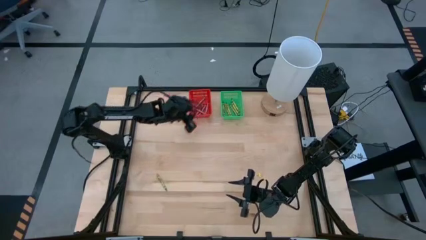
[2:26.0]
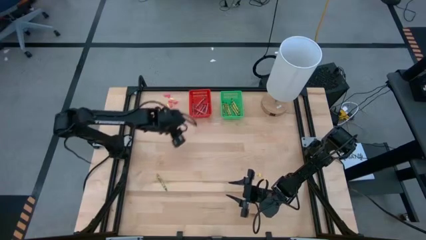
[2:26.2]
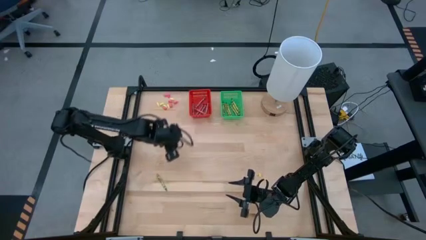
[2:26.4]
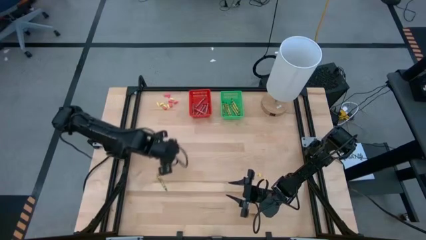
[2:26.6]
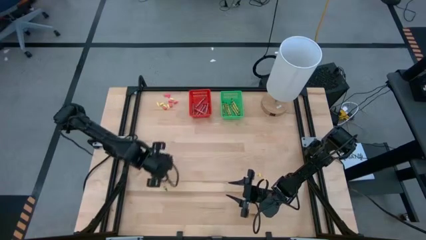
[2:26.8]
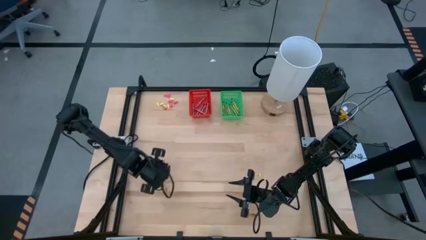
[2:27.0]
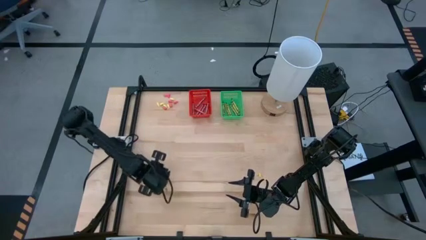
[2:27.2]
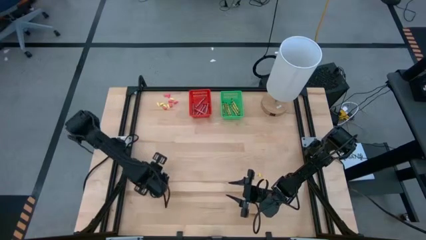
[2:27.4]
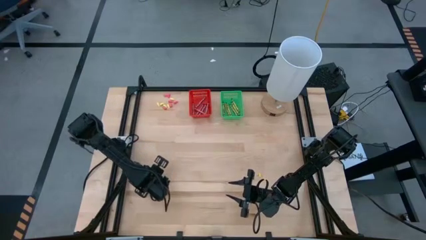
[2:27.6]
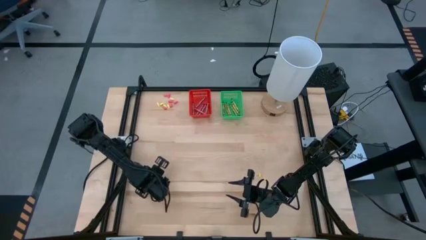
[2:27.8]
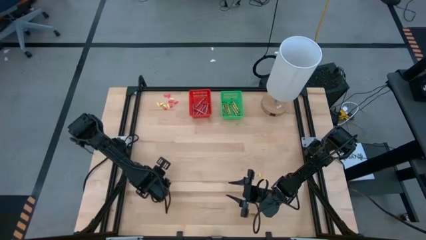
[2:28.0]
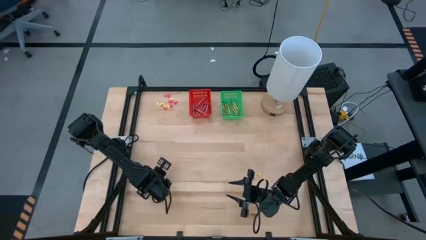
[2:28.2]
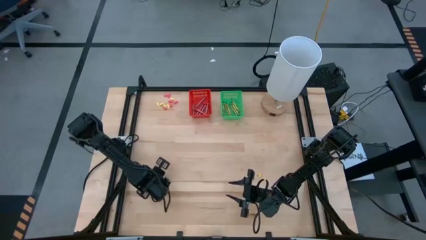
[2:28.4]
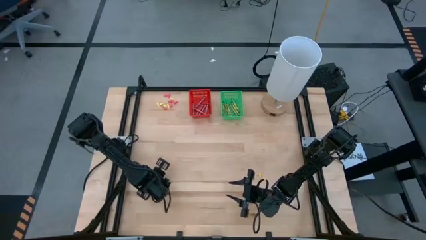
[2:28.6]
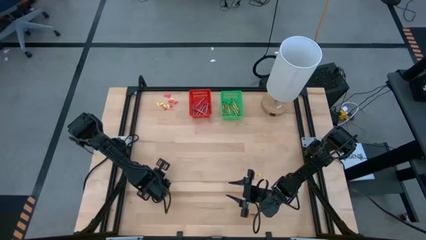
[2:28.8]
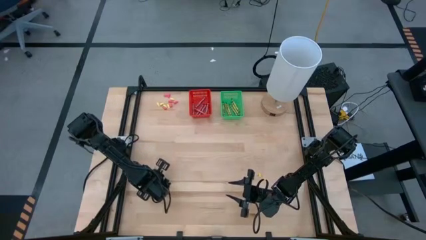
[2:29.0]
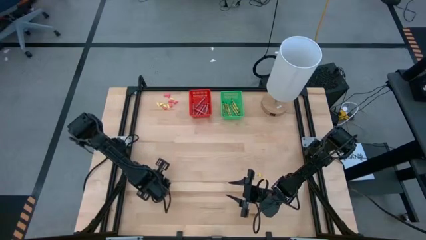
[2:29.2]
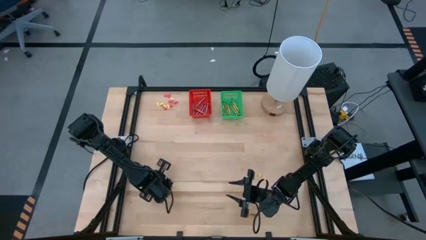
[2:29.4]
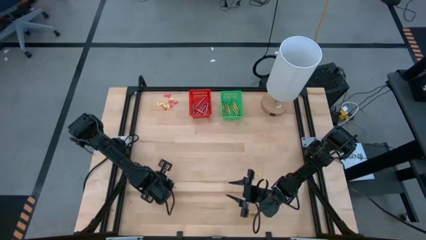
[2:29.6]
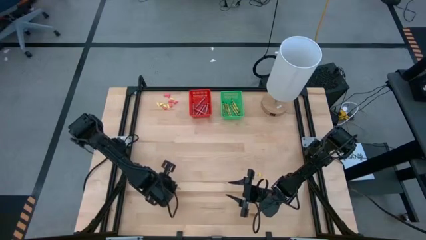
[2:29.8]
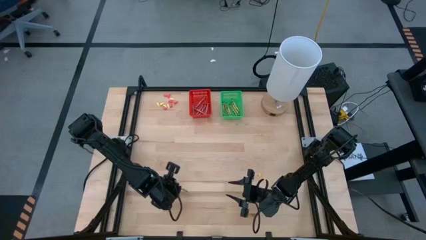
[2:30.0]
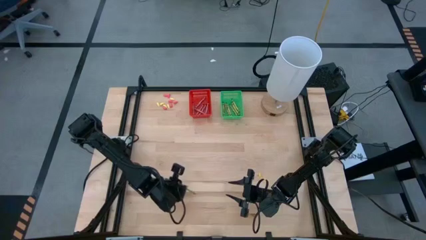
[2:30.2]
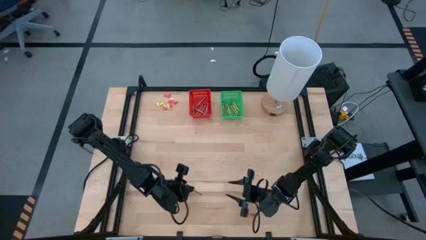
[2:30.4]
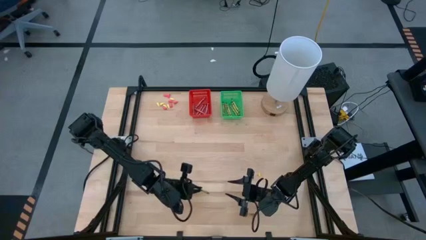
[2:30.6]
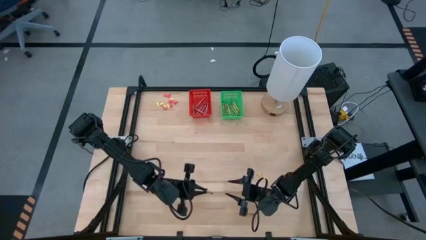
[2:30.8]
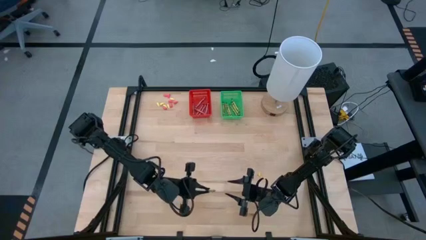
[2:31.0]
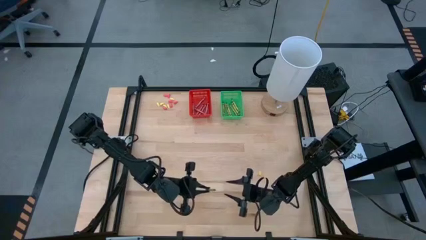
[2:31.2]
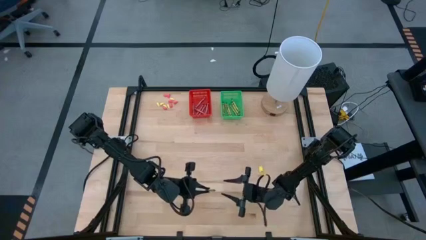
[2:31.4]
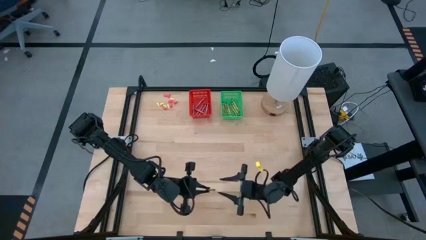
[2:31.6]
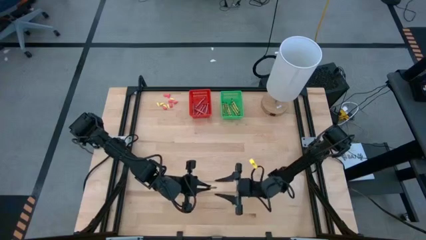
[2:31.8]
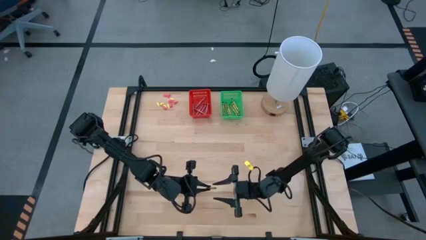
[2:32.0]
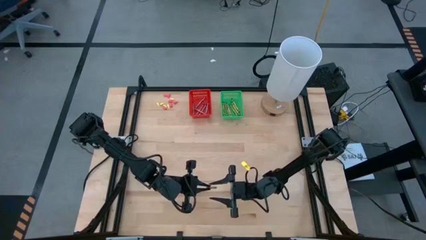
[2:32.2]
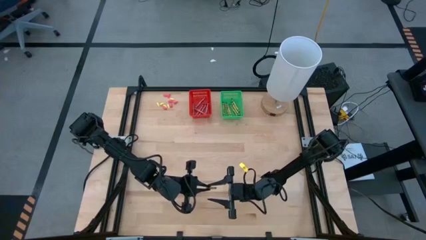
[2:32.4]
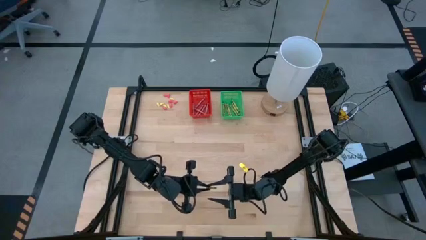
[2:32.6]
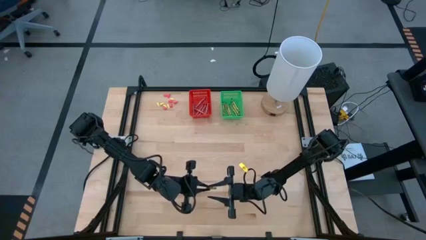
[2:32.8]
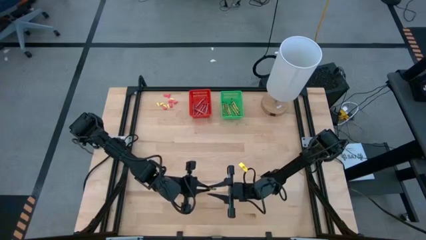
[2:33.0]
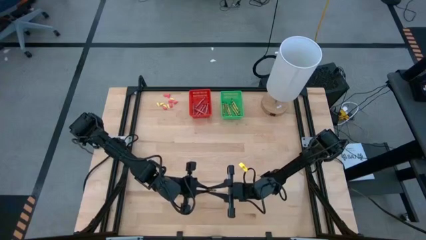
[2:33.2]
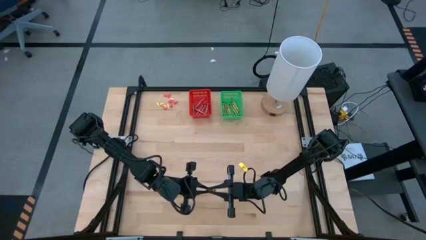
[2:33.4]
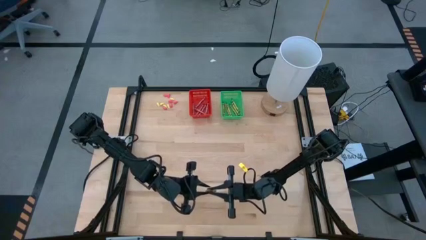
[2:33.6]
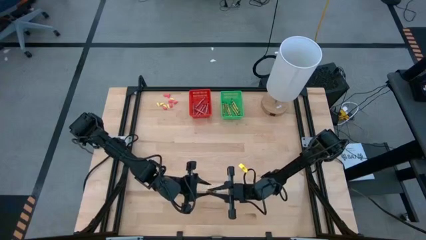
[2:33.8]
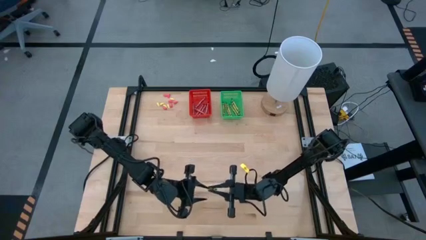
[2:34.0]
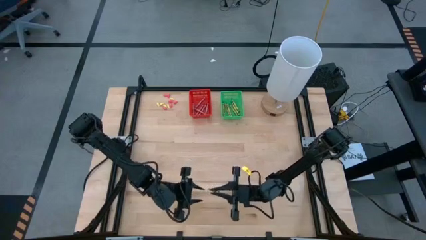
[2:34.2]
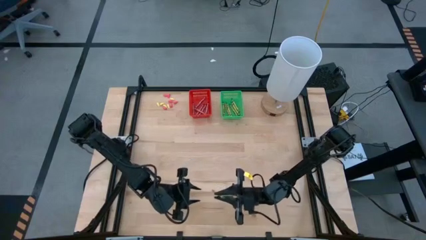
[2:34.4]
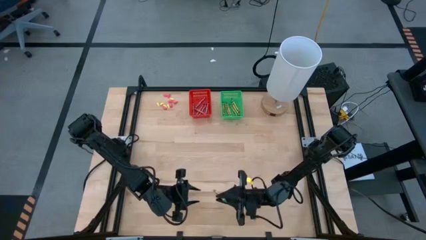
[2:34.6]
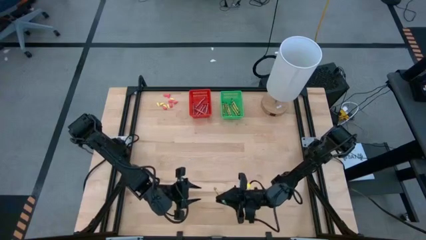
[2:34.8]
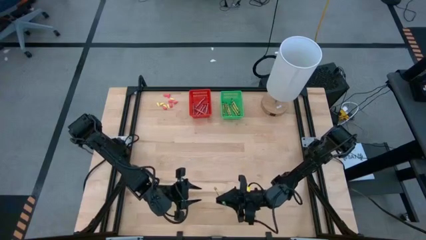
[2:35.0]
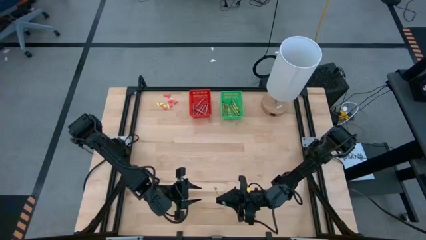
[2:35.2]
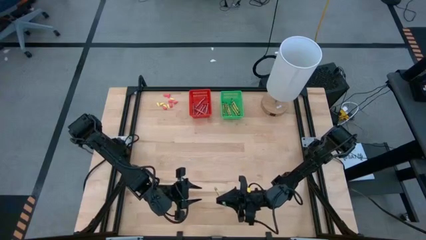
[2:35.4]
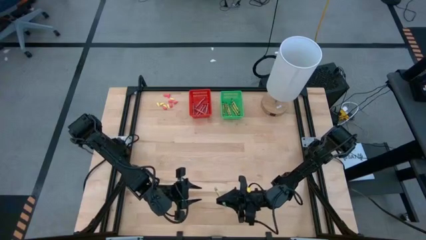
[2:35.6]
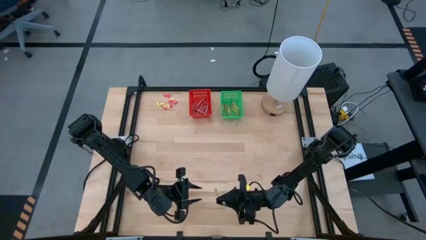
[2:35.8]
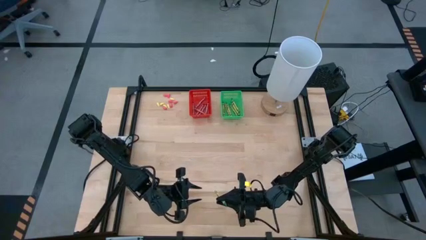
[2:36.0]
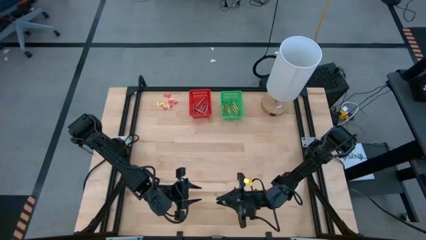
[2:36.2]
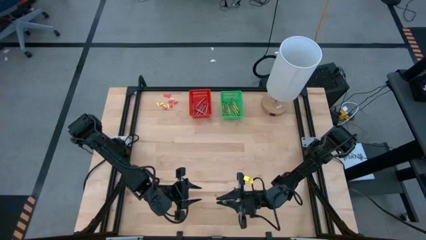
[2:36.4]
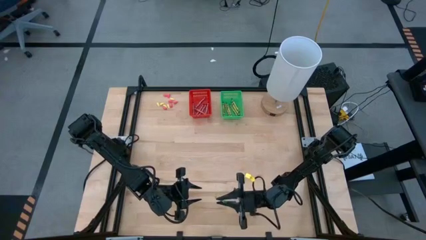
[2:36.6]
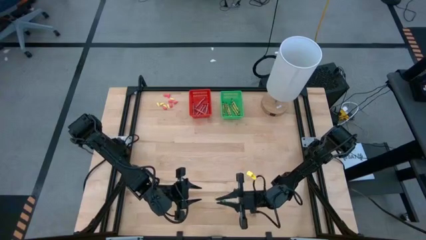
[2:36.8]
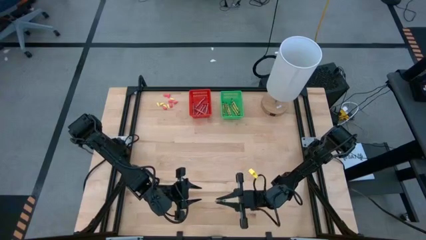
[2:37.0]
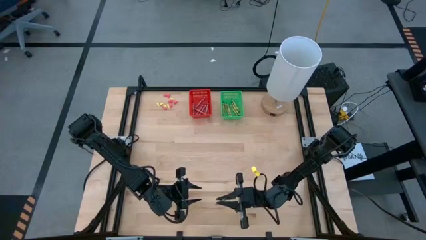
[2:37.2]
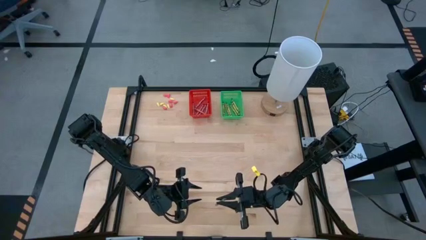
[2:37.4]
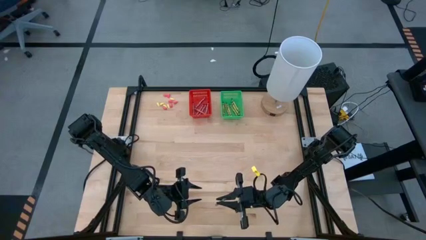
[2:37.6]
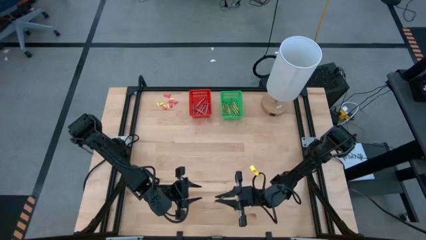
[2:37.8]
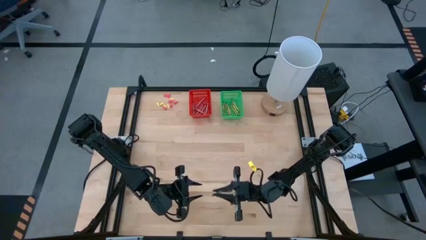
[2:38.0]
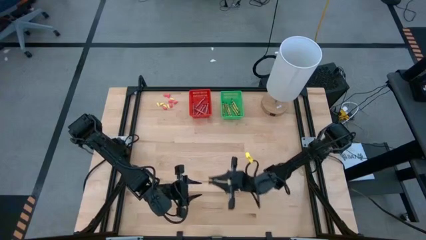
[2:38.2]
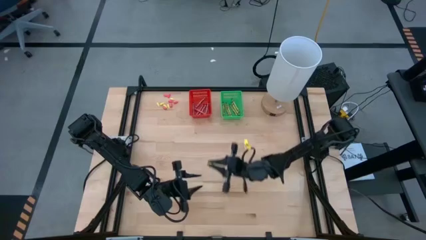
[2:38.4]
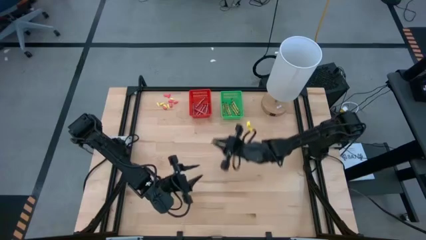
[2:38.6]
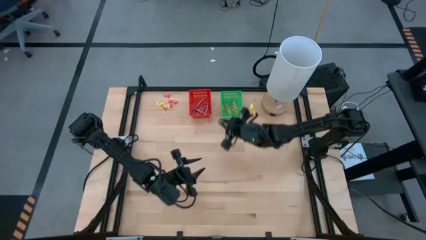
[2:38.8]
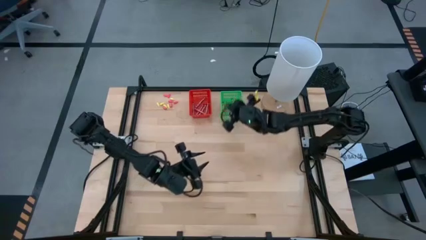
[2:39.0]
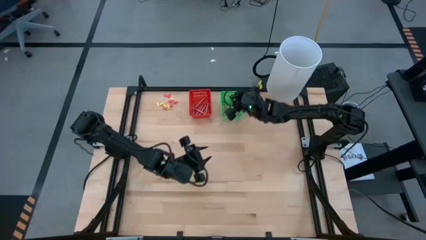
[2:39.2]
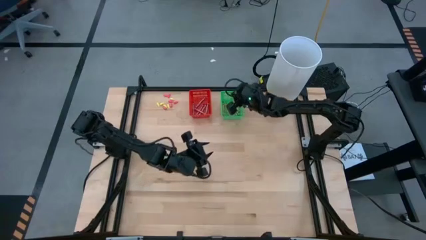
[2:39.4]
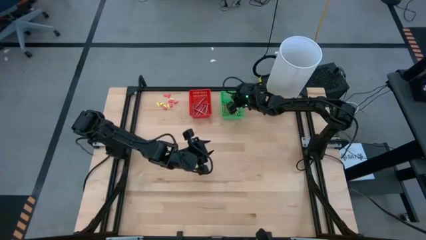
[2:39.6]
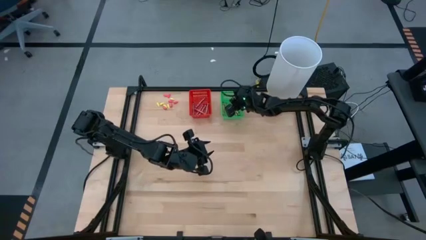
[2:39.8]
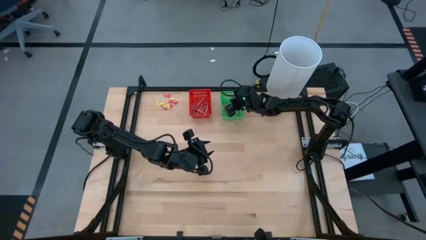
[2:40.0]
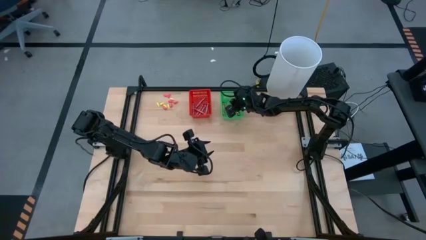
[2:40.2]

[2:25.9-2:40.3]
Task: Sort crayons
Put the green crayon into the green bin
